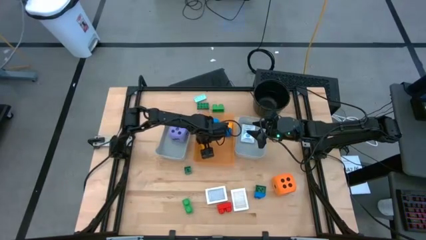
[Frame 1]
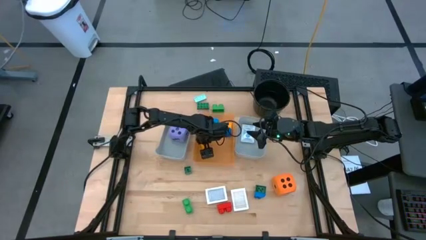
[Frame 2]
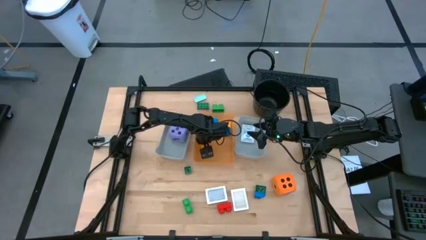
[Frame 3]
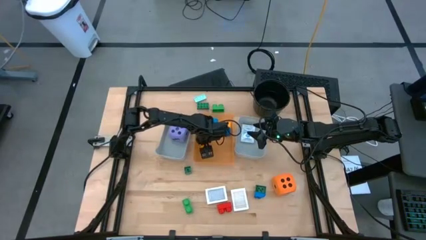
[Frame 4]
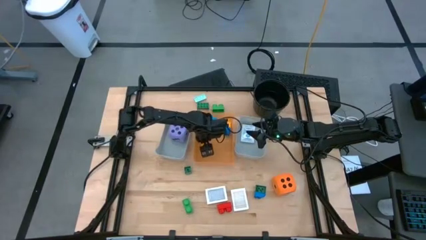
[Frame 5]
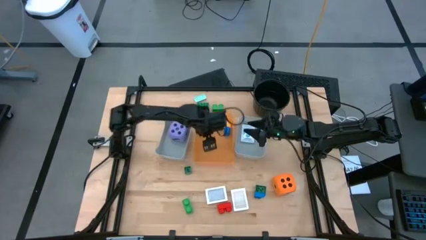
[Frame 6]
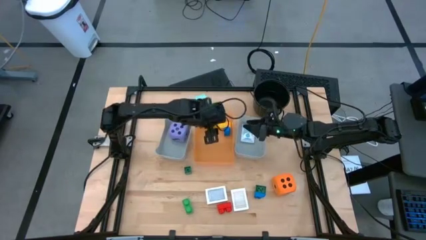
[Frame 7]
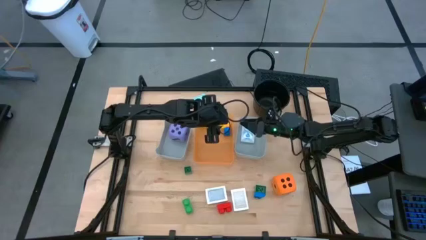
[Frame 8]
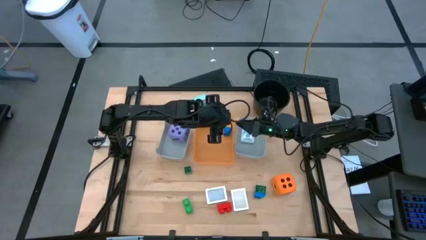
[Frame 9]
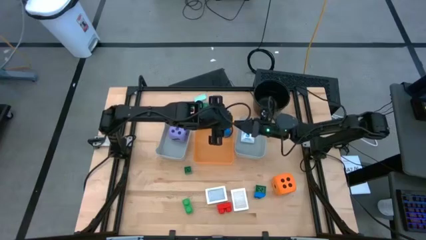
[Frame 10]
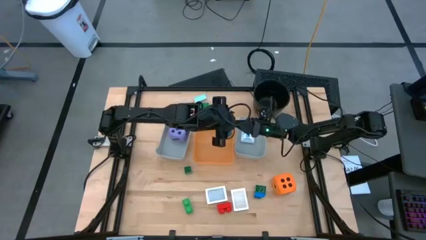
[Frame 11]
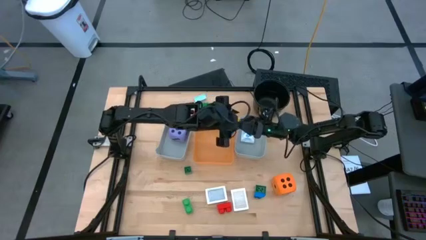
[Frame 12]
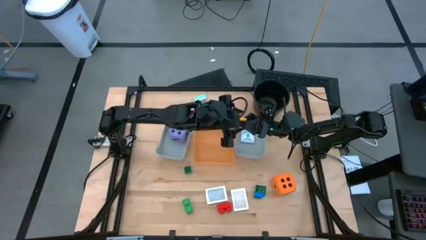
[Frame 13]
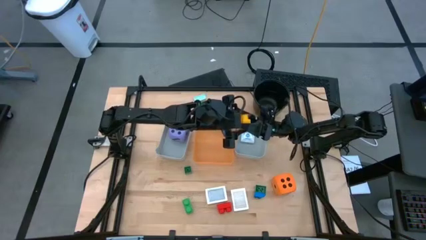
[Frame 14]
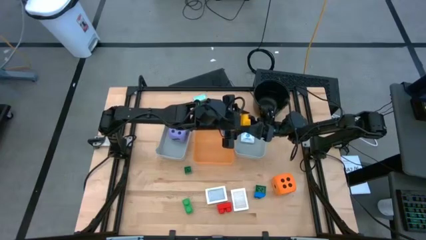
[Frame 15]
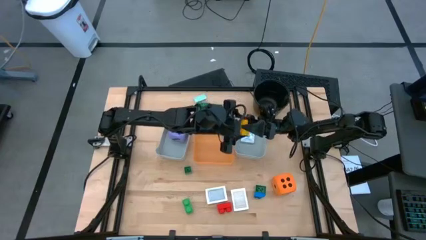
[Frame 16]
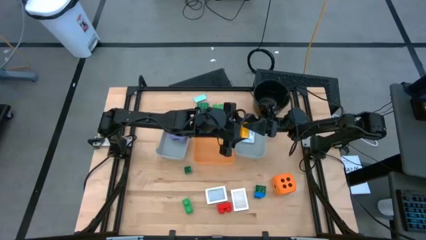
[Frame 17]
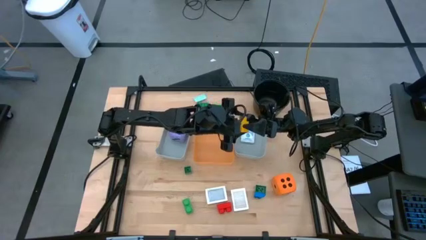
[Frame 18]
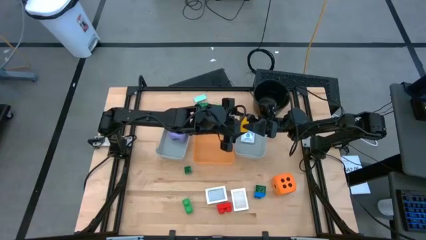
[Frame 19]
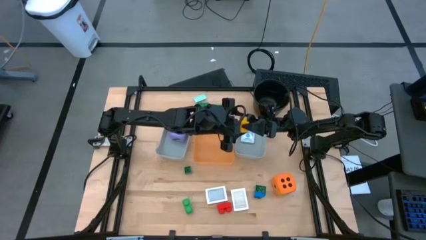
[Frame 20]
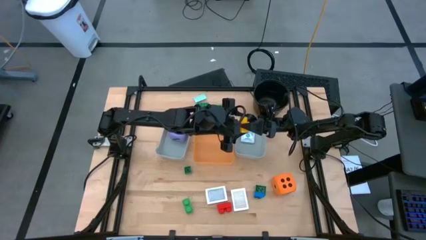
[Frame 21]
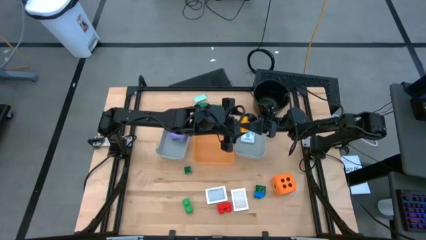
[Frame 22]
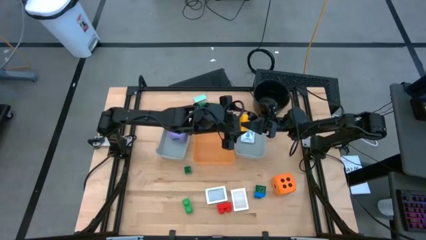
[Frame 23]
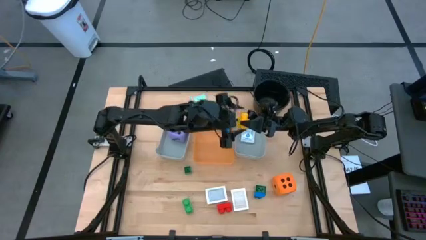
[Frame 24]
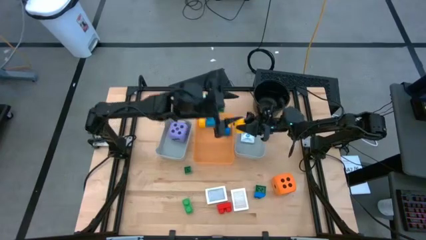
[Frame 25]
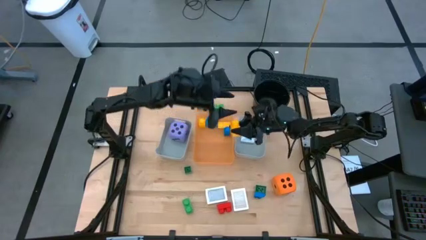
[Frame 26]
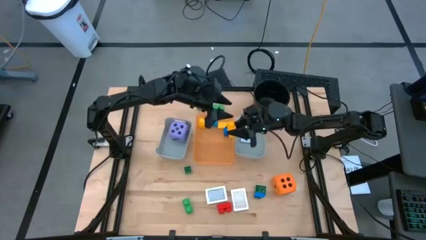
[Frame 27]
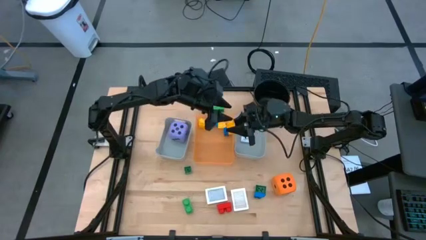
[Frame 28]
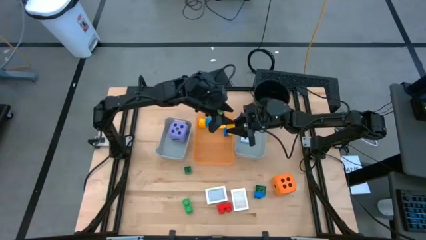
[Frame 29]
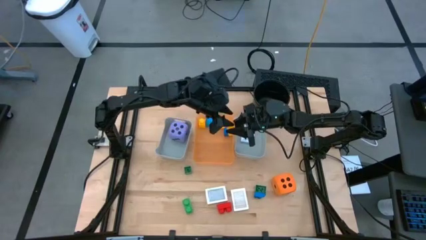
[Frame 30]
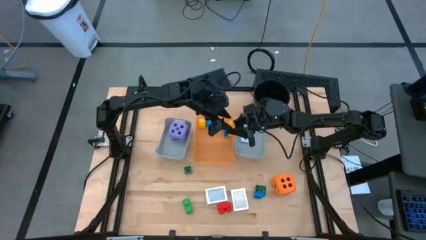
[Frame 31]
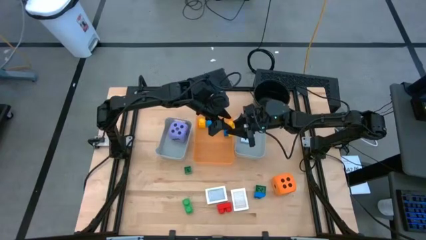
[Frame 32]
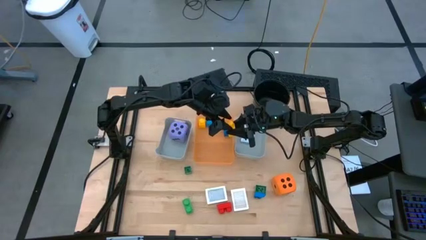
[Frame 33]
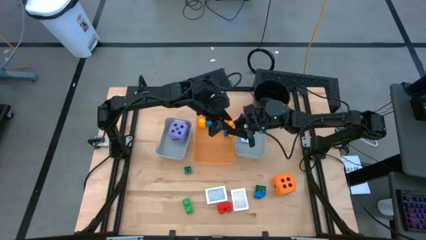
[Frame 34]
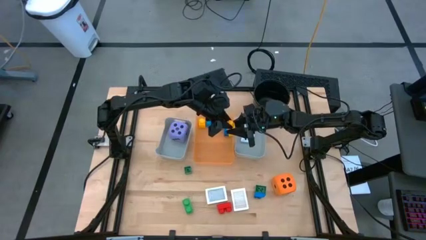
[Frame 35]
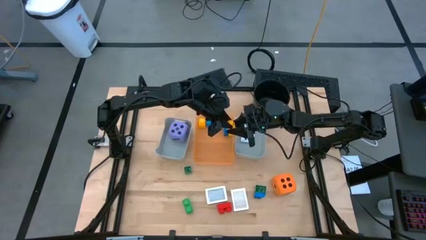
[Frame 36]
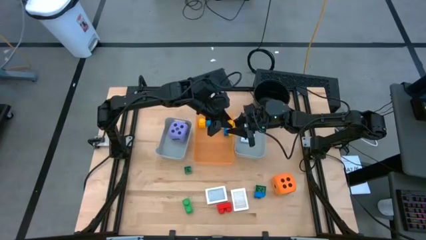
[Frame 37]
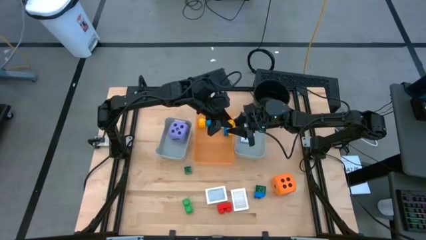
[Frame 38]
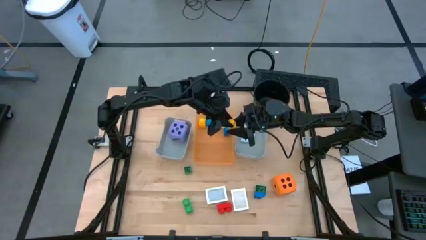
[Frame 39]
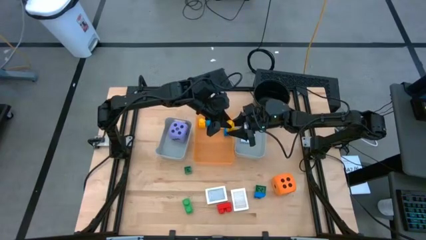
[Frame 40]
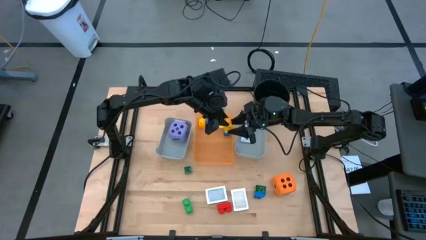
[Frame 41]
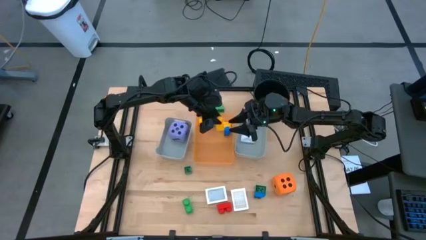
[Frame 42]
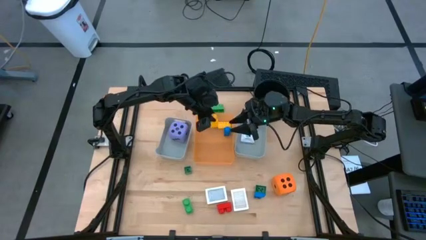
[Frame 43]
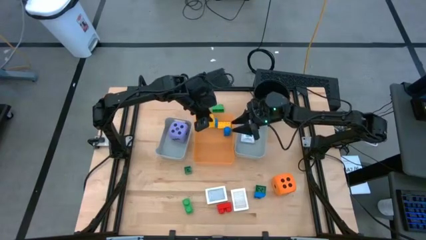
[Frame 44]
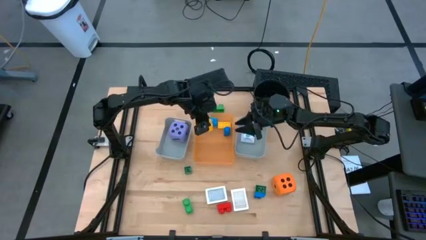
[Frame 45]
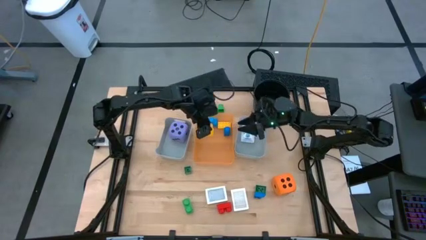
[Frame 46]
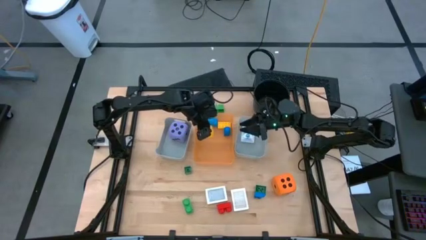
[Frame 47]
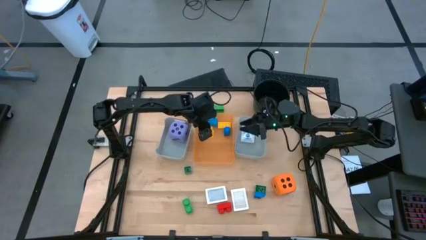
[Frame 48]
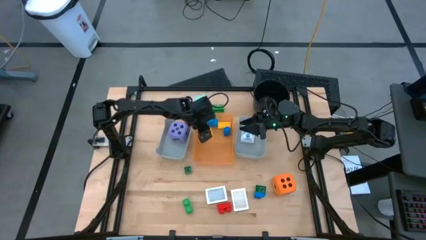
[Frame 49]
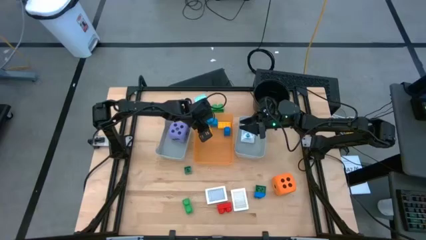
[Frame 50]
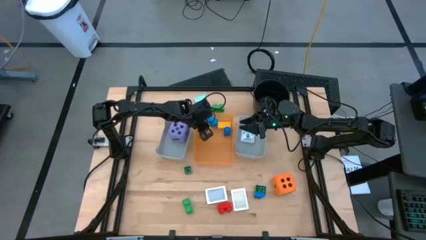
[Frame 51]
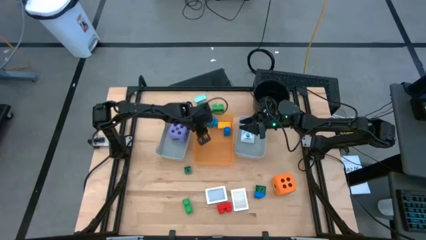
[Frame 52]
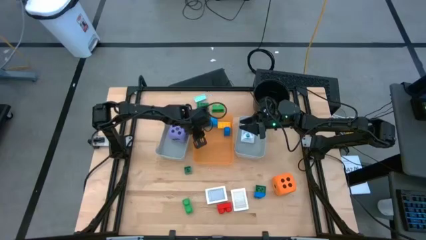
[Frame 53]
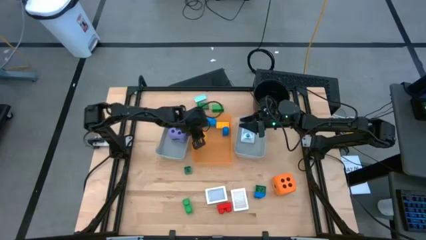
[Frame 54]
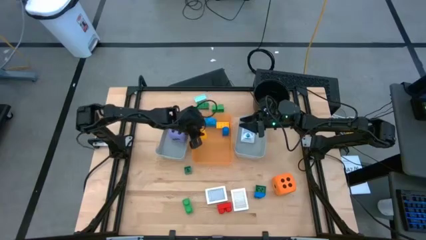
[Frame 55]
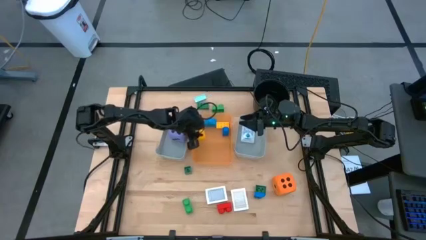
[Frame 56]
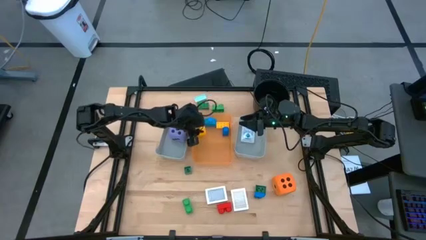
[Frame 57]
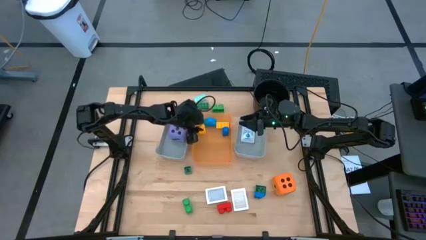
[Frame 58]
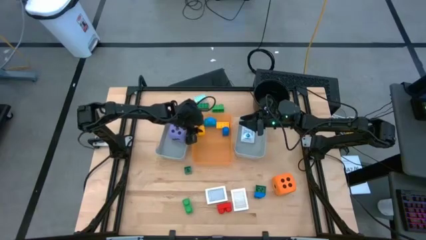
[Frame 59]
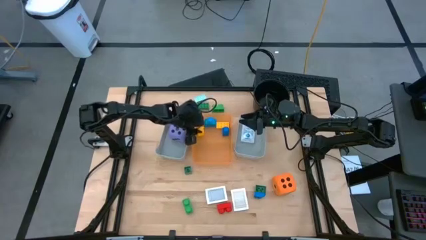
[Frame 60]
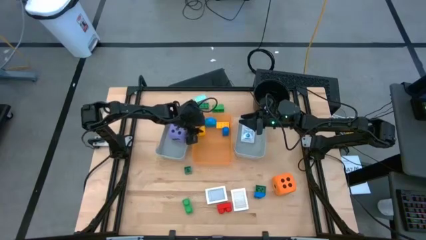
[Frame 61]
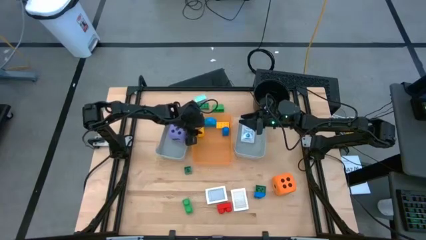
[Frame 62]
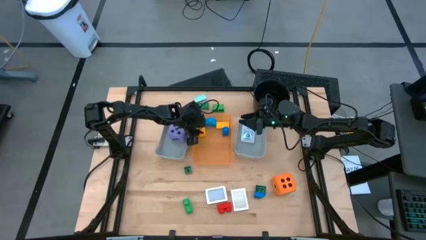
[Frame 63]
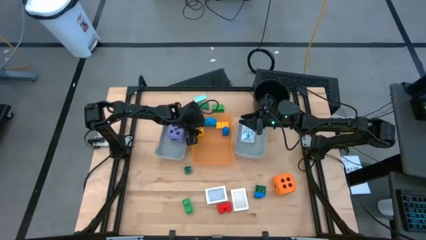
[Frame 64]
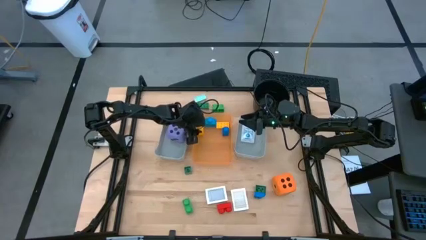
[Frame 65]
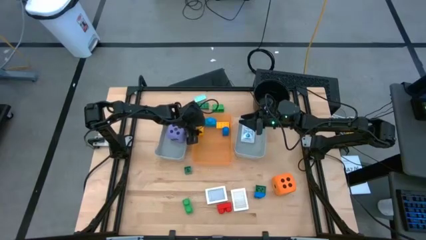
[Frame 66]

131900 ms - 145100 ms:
Task: Pick & Place Toys
Put the yellow game piece into the orange bin

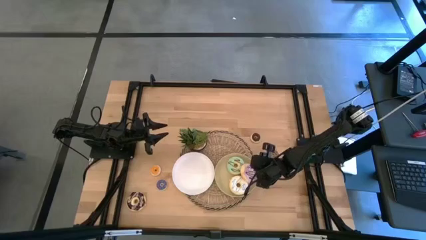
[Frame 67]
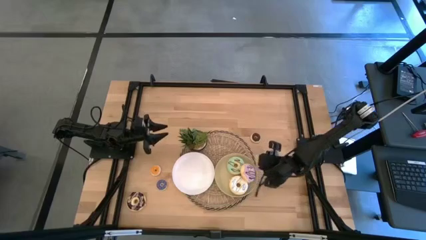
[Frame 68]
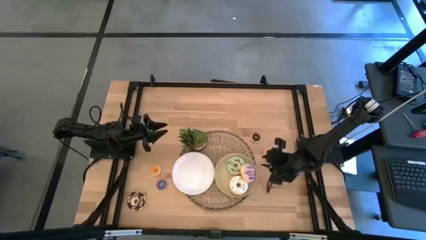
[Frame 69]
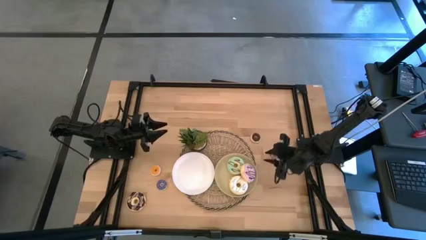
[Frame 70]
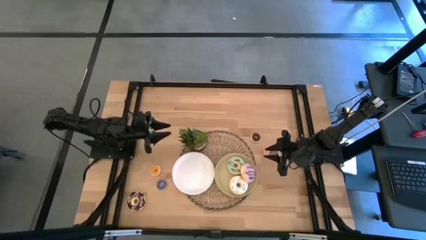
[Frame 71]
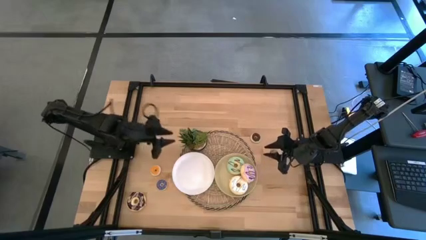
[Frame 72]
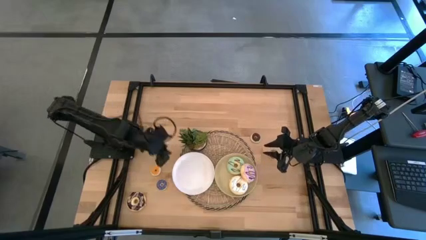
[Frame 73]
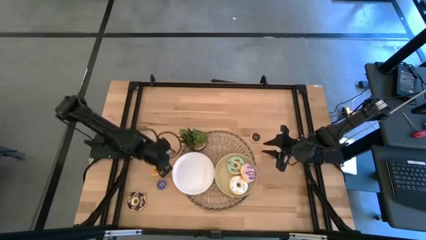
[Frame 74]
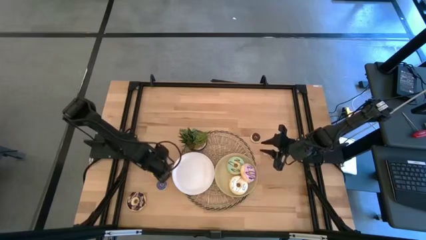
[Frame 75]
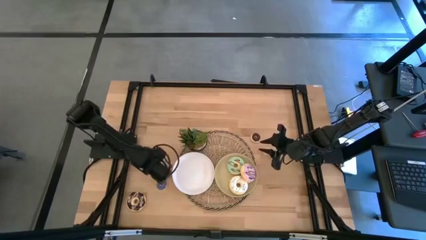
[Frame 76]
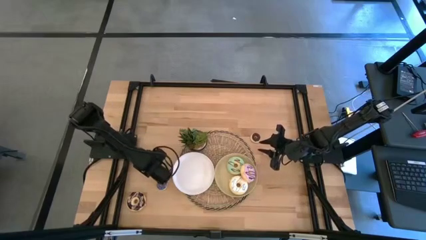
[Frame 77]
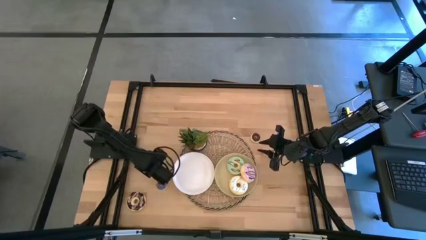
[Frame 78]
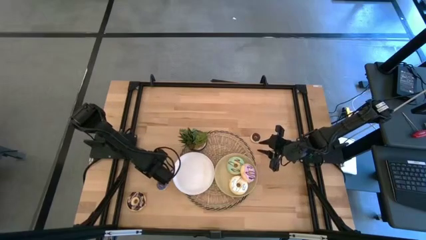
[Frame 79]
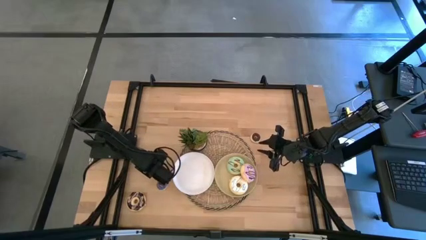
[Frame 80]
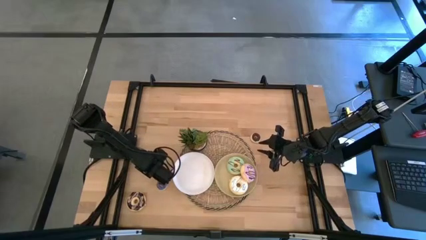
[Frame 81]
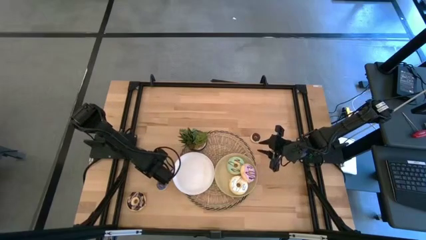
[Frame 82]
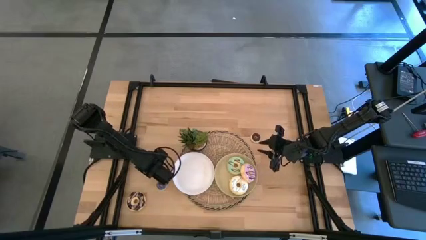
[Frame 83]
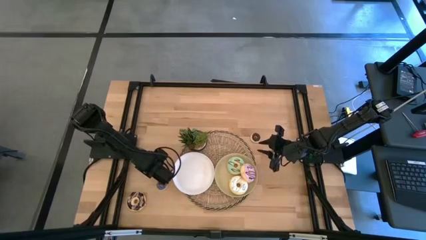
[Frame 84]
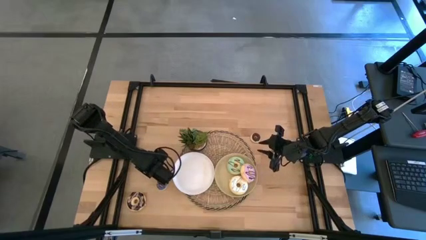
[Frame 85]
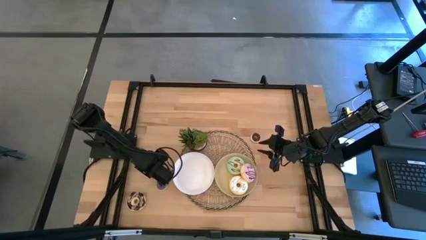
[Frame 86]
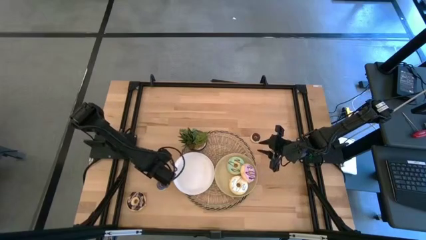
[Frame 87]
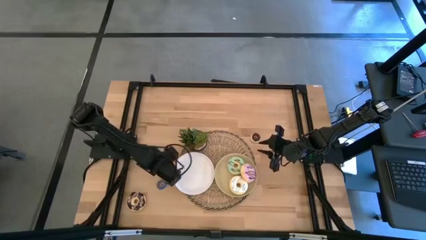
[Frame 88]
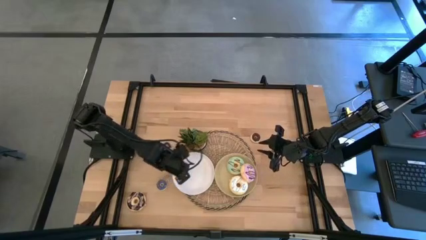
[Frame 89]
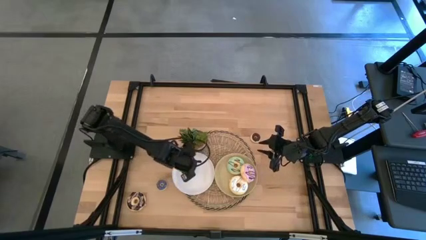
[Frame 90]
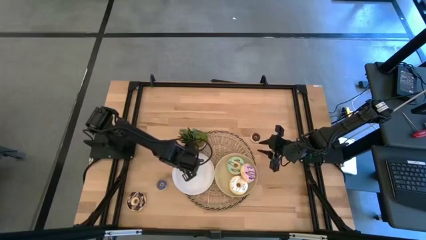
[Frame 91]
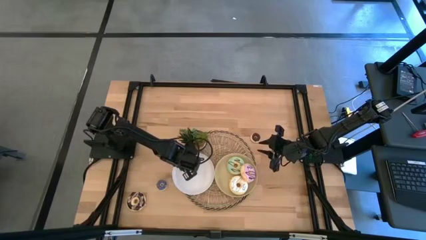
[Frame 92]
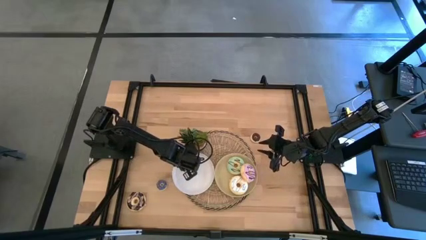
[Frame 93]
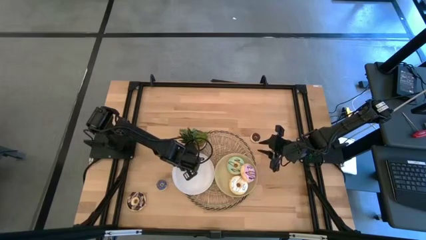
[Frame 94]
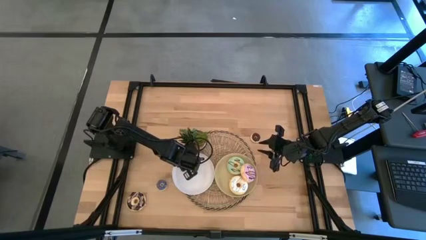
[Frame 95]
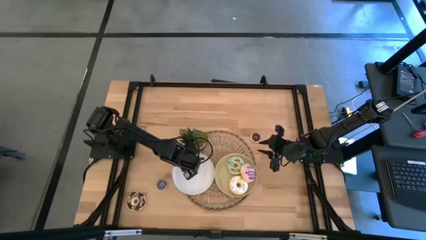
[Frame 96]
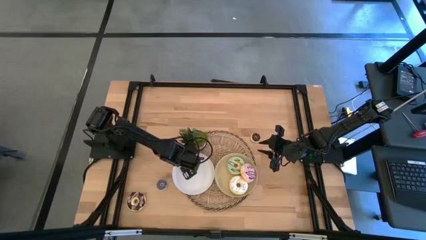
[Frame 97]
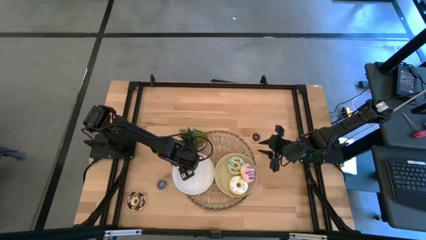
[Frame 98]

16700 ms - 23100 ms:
Task: Pick & Place donuts
Put the small orange donut on the white plate
